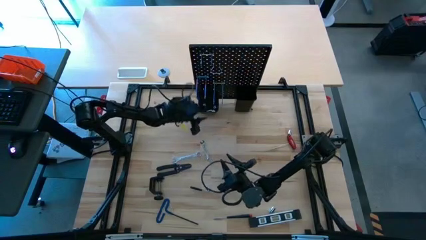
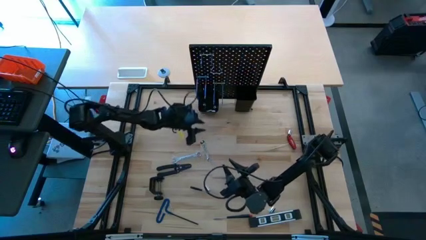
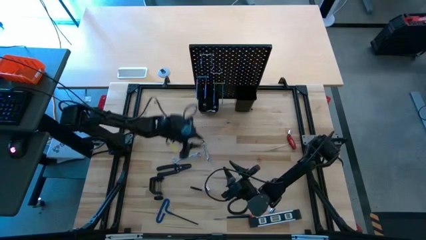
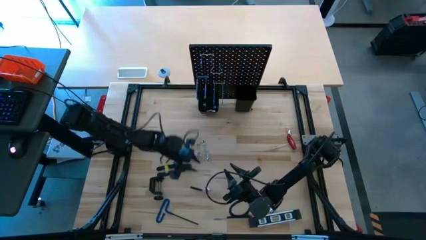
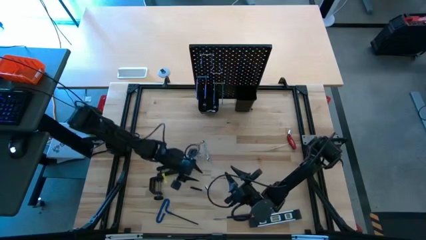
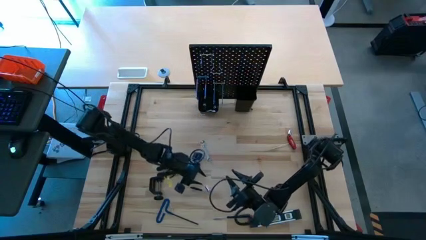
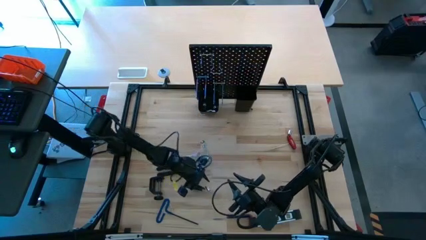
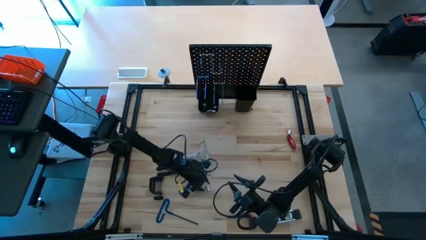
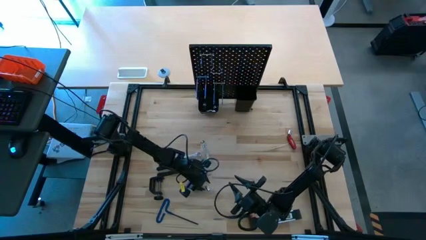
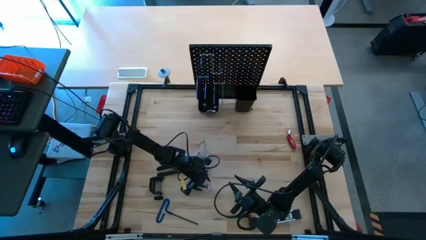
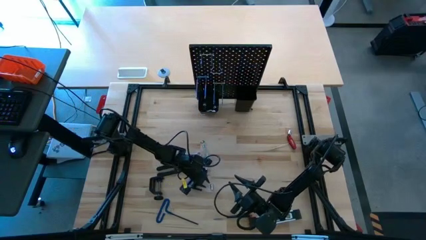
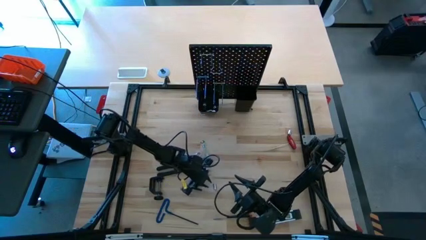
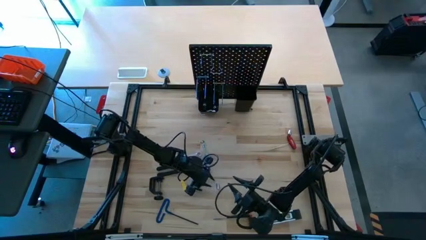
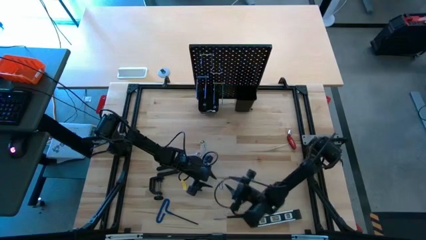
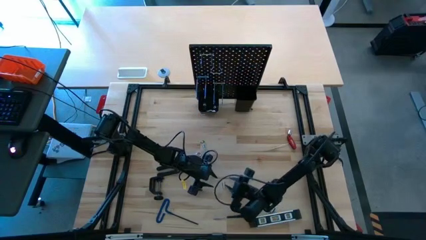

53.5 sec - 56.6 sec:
Task: Hang tools onto peg board
Put the socket into the left bin on the pegboard

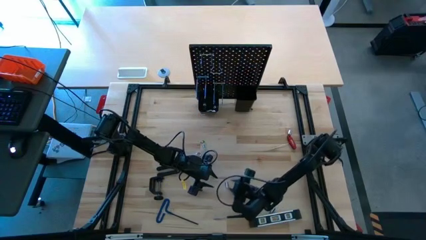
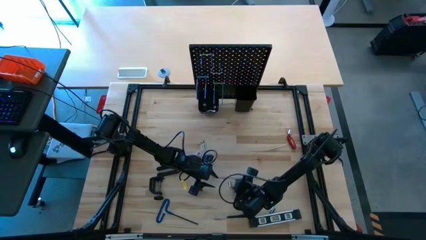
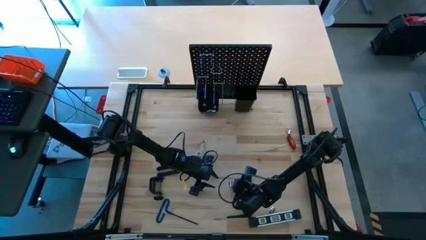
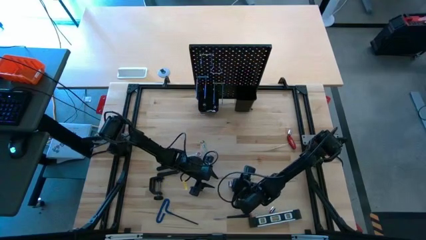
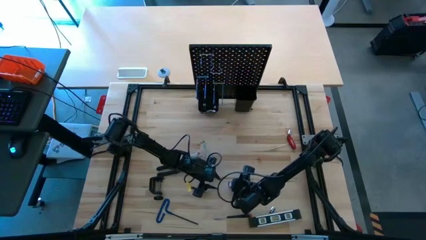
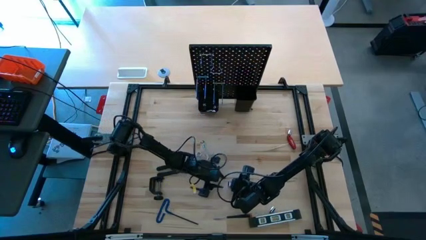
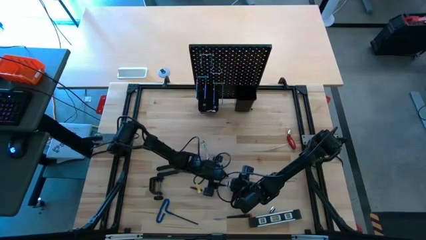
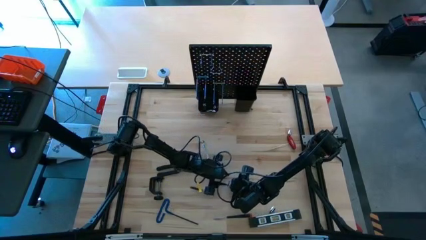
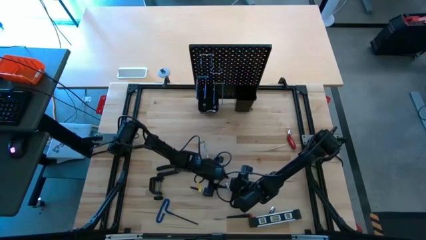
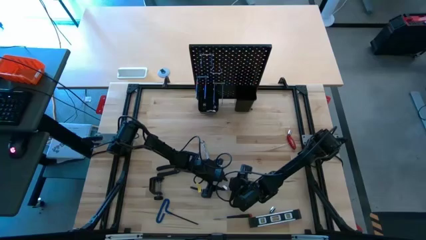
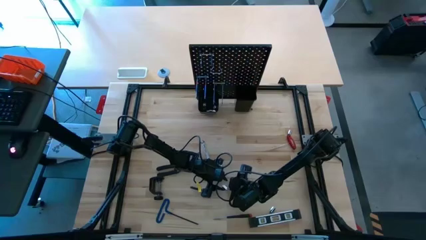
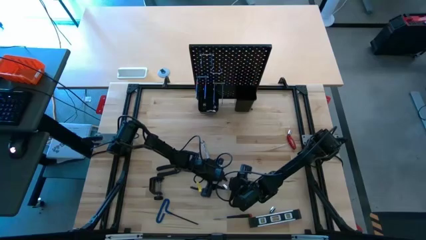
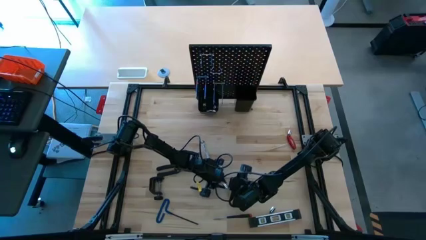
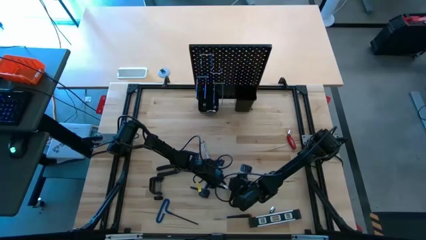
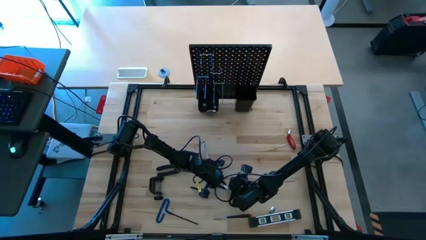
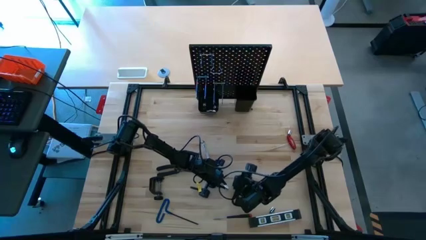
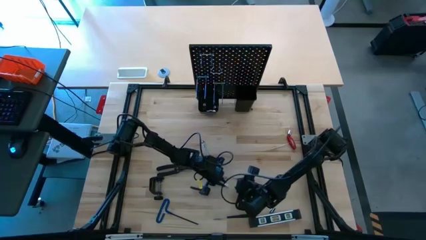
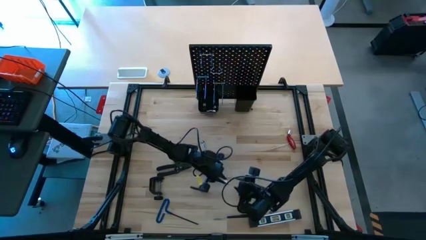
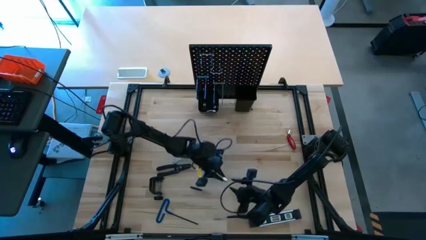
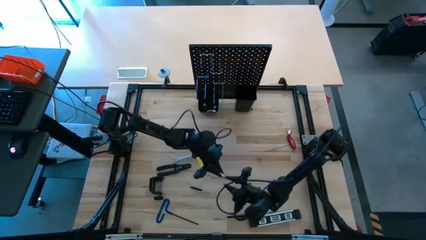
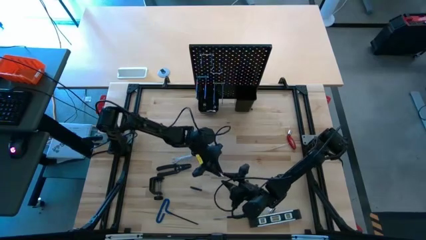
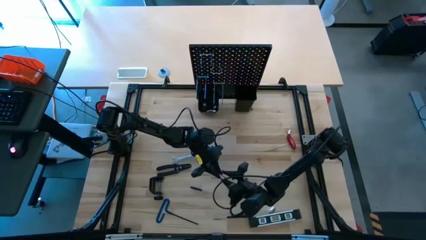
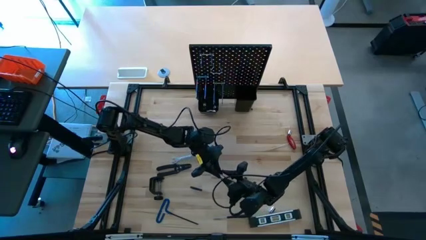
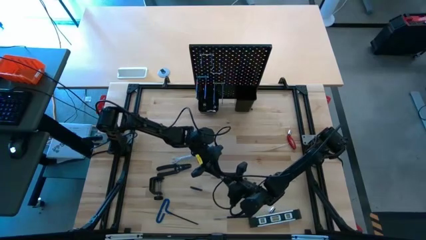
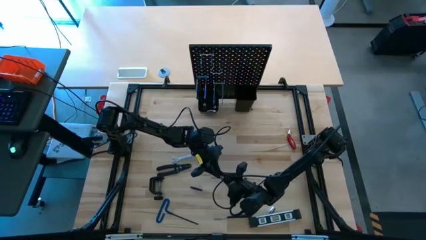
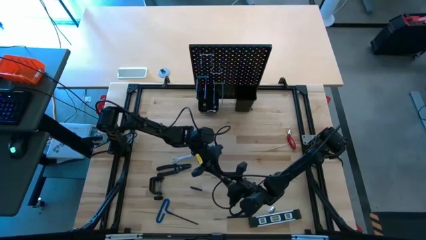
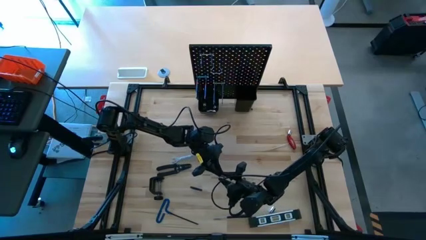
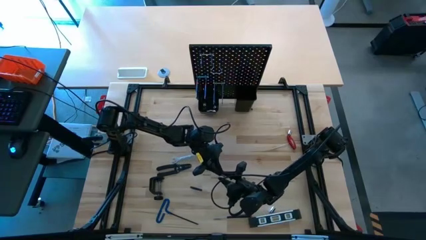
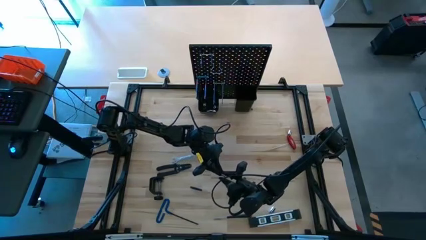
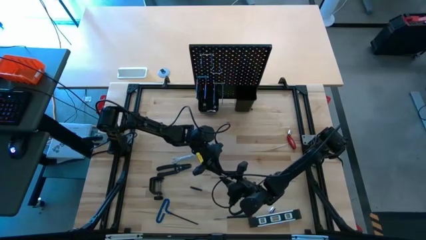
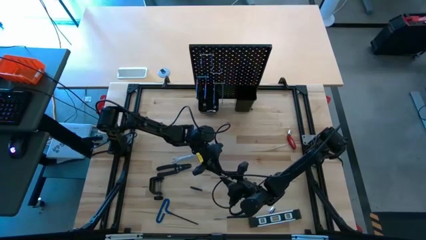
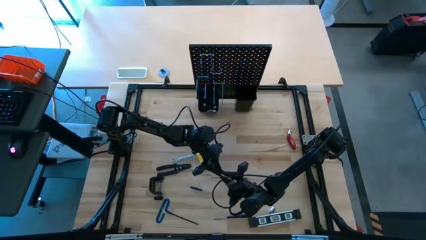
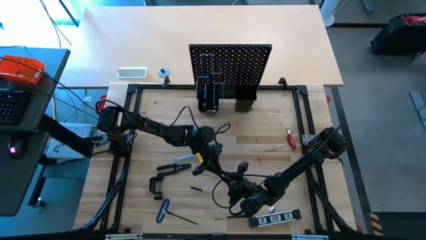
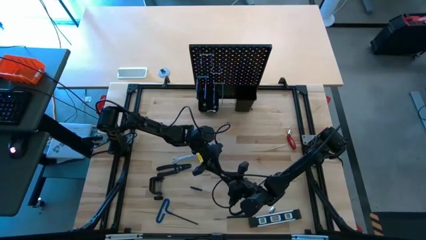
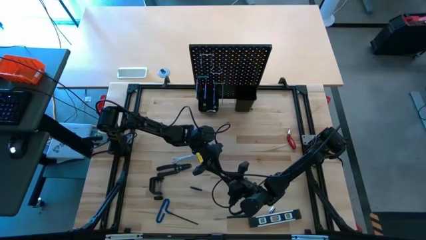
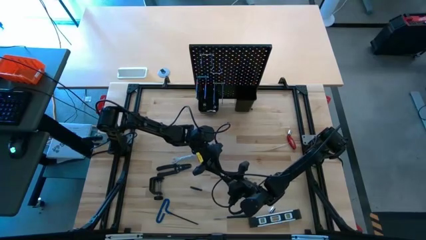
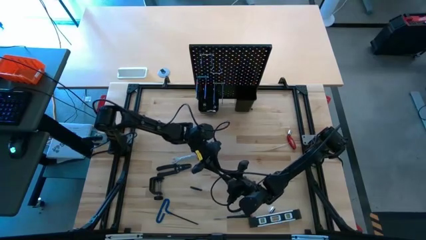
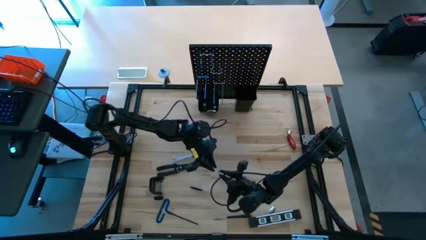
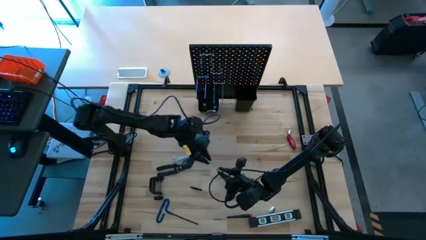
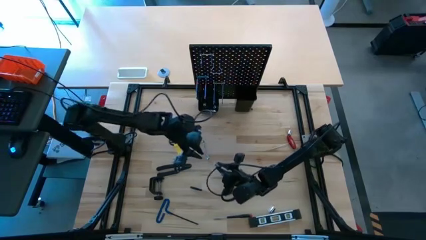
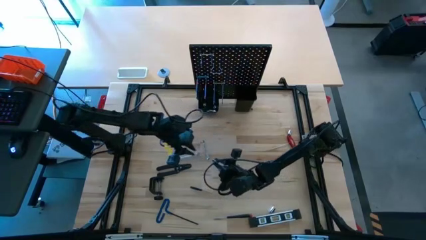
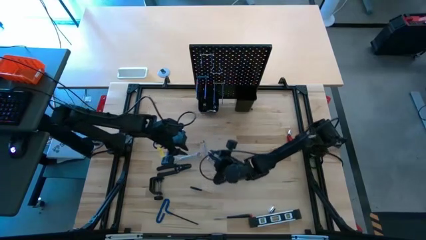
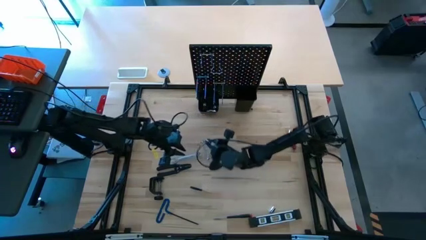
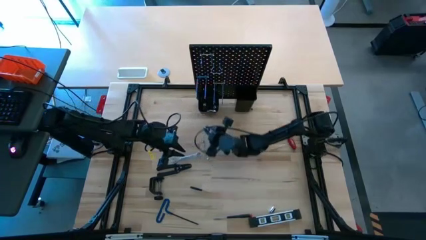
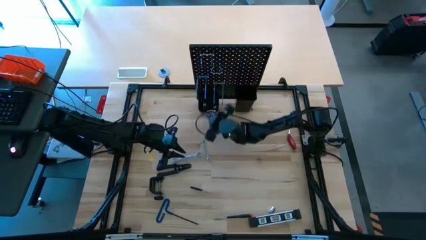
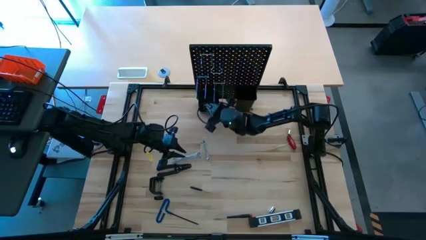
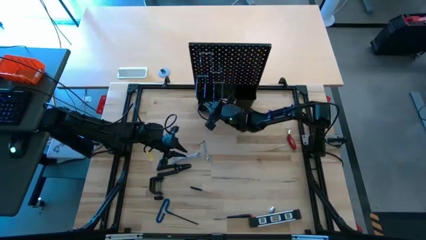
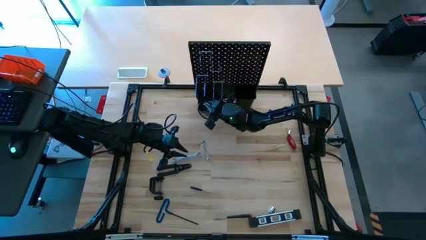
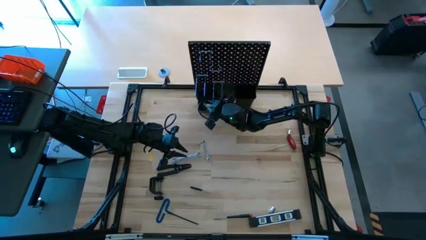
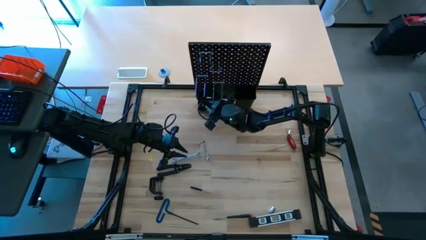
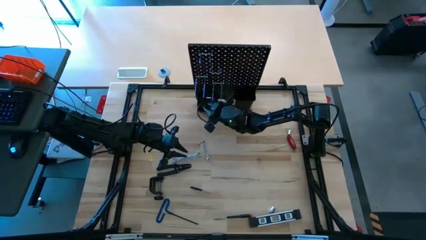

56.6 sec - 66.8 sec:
Put the socket into the left bin on the pegboard

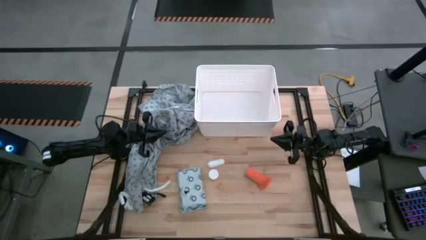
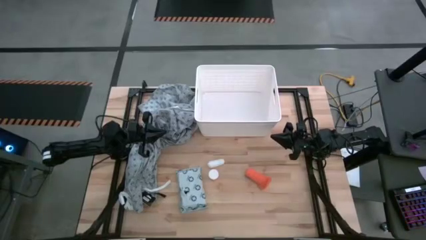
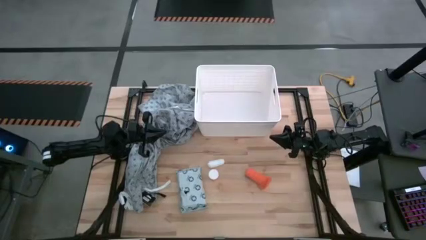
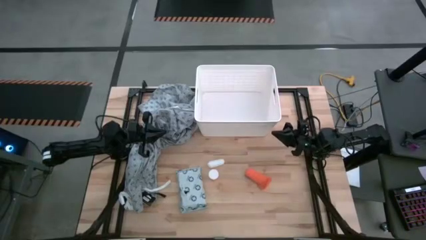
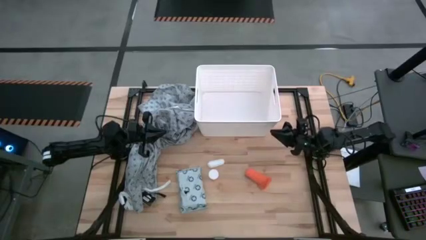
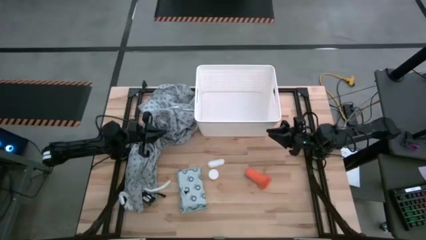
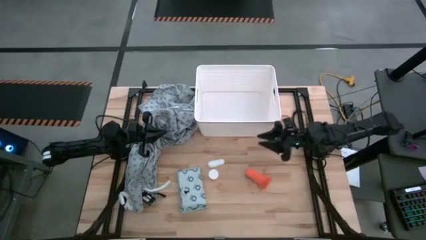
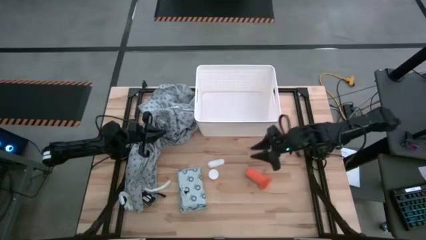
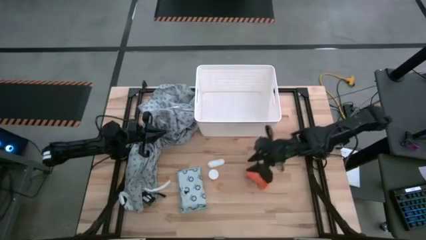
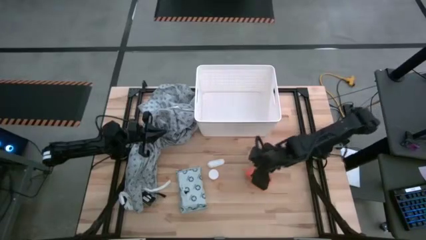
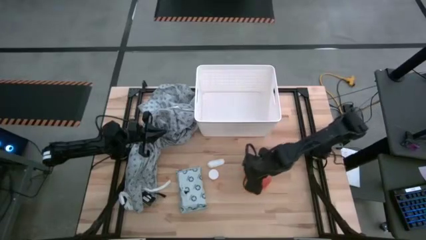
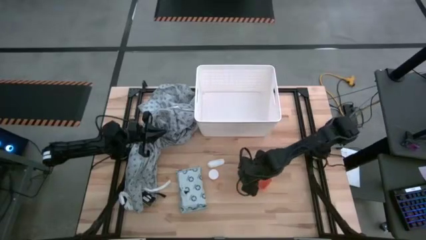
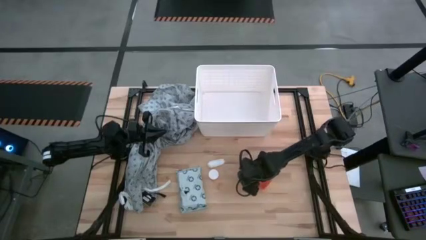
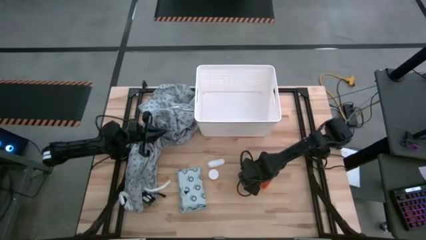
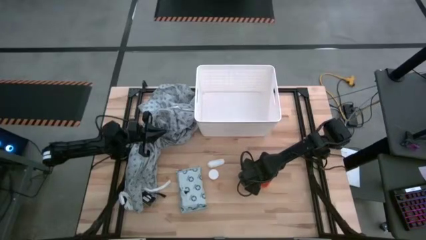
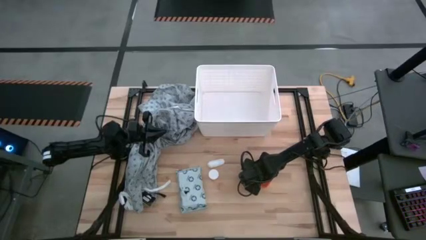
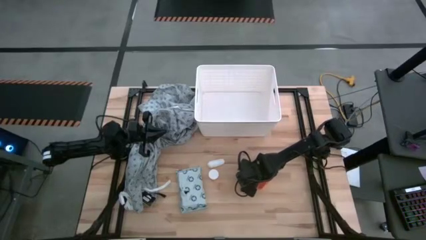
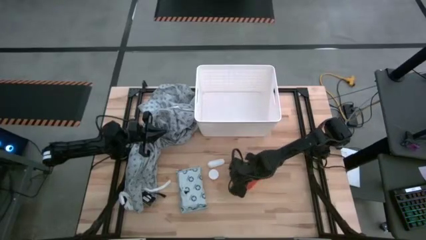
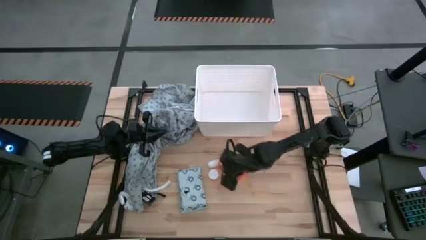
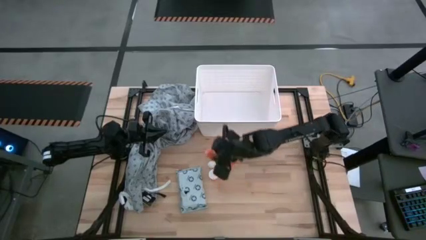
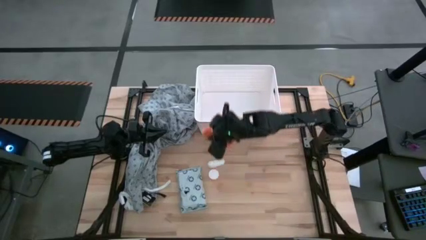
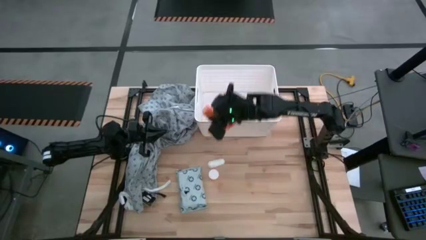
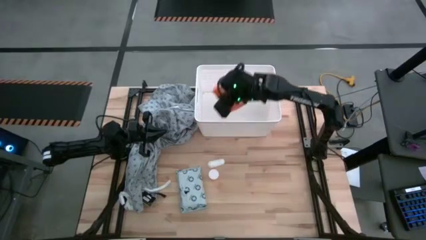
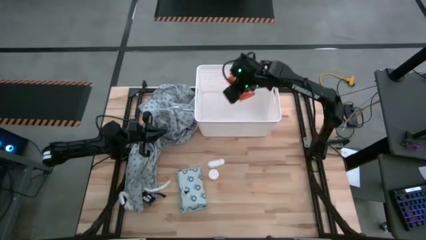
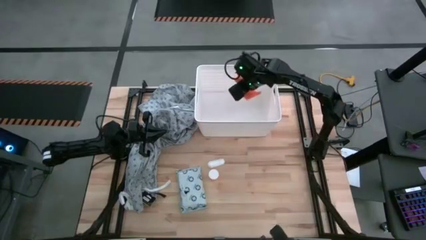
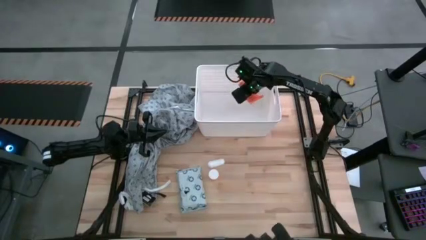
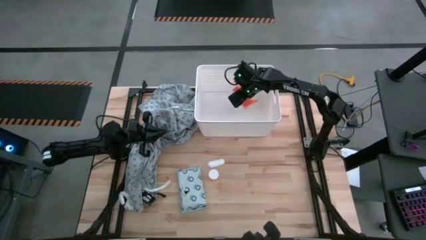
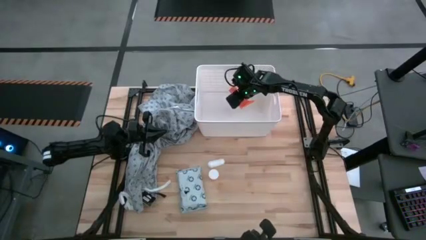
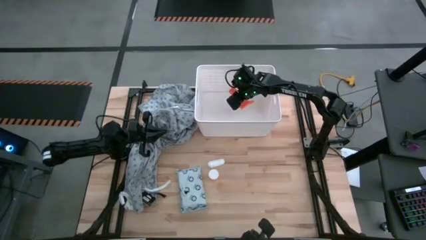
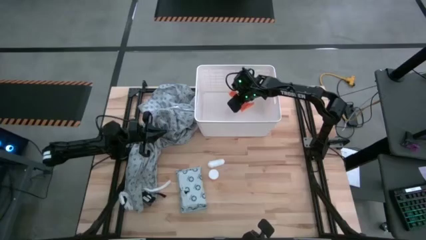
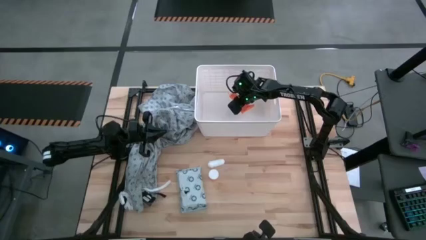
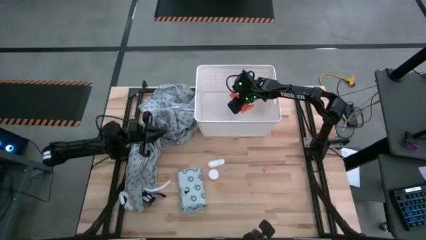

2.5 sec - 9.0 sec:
Task: Pick & place medical supplies in basket/bin
Put the orange bandage into the white bin
